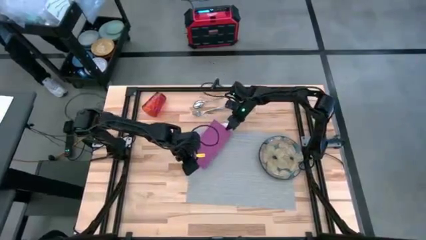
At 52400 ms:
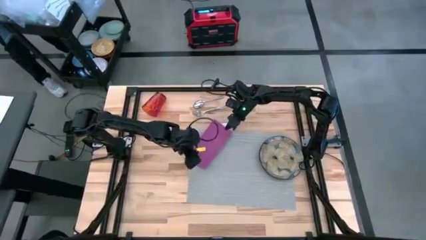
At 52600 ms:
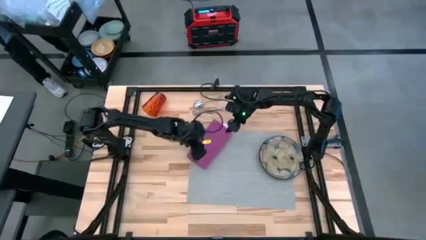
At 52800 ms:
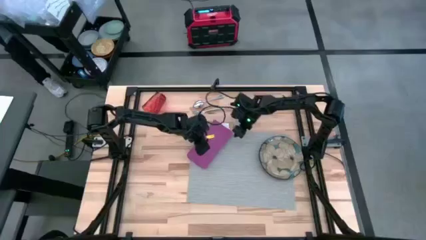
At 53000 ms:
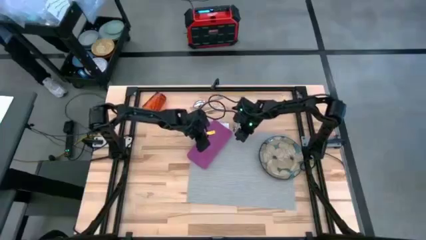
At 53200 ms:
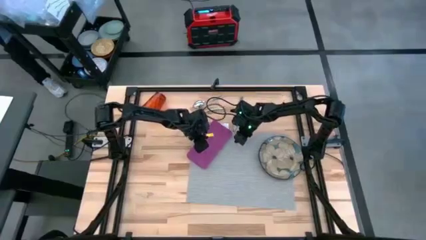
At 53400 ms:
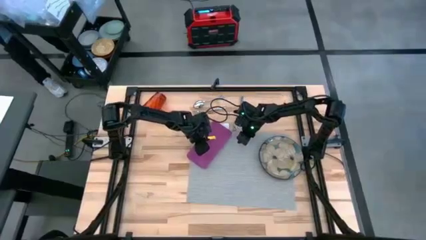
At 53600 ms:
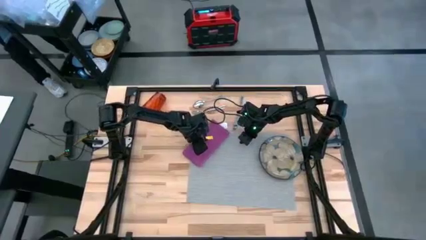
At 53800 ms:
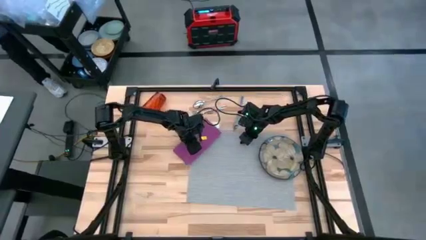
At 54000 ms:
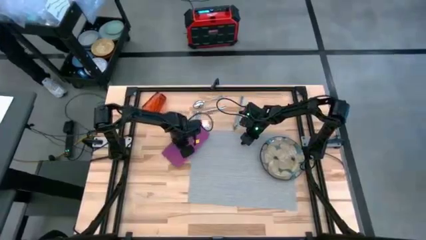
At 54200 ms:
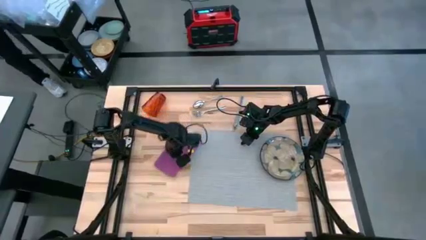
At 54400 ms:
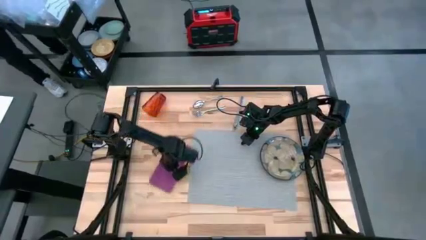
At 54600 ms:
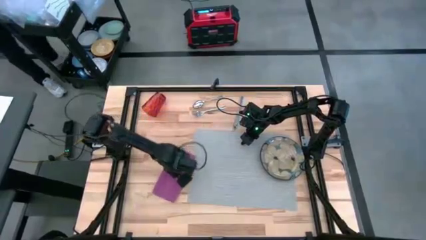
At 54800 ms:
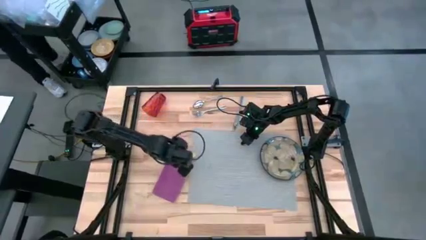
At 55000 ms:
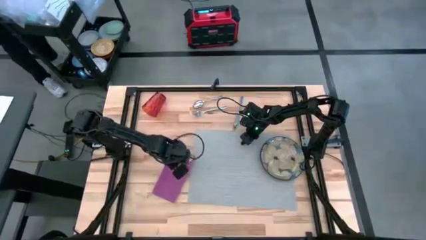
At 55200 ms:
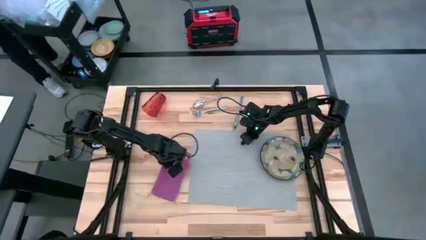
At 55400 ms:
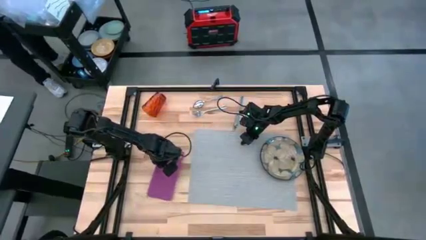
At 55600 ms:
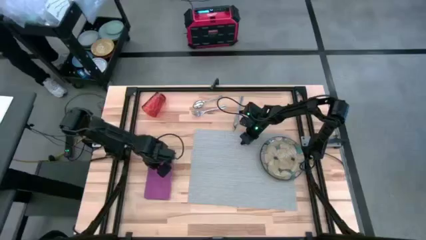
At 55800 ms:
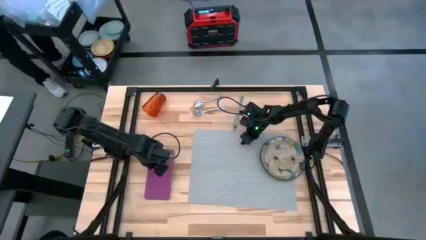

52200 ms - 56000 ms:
Task: Set table place
Move the folded violet table napkin to the left side of the gray table mat

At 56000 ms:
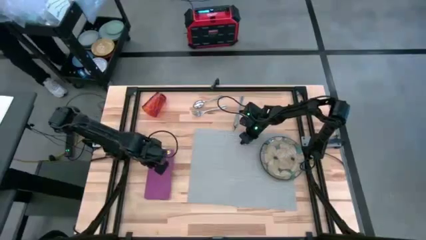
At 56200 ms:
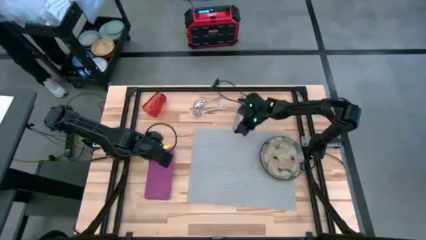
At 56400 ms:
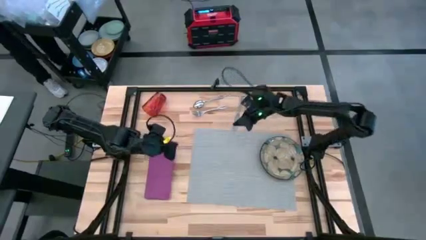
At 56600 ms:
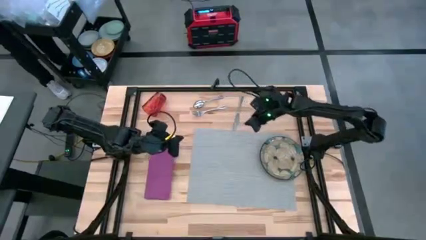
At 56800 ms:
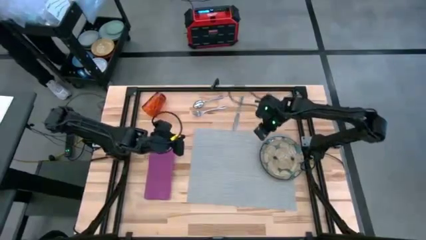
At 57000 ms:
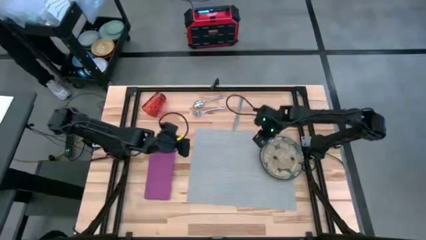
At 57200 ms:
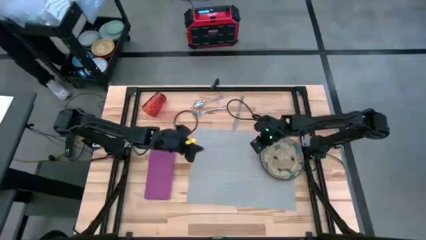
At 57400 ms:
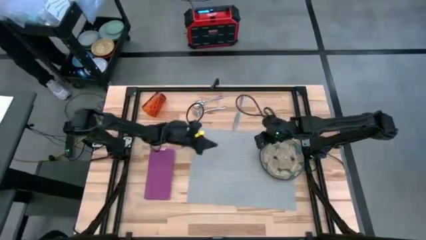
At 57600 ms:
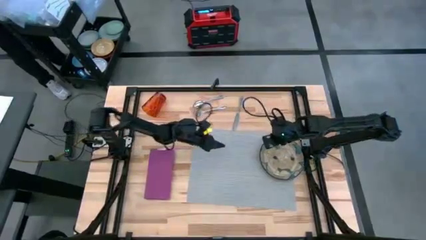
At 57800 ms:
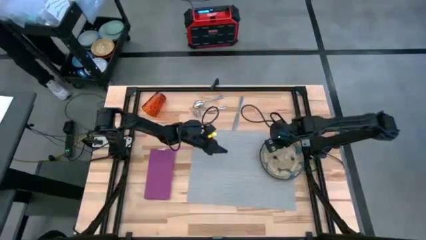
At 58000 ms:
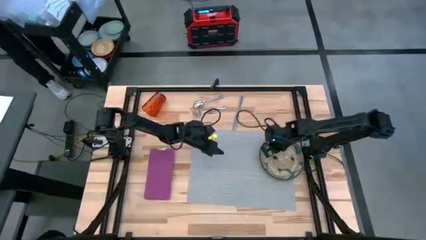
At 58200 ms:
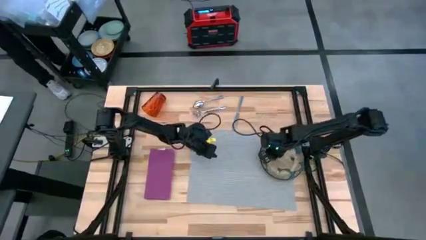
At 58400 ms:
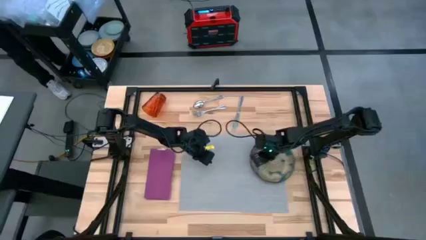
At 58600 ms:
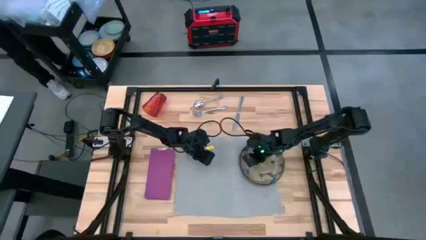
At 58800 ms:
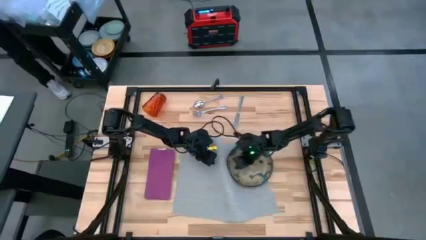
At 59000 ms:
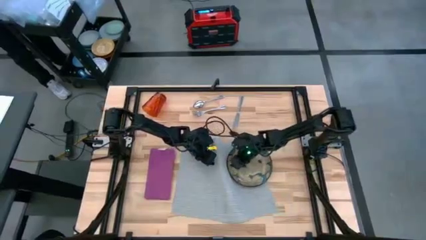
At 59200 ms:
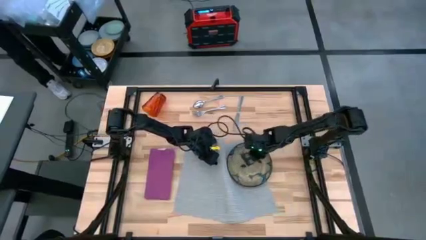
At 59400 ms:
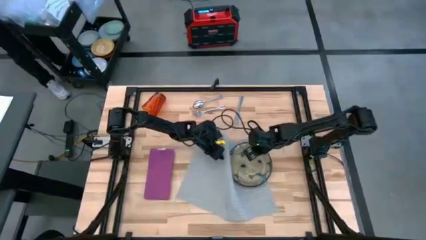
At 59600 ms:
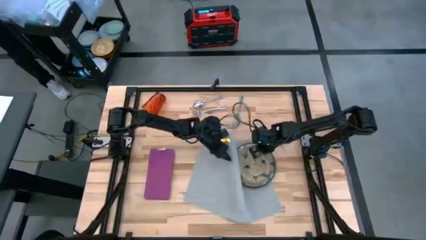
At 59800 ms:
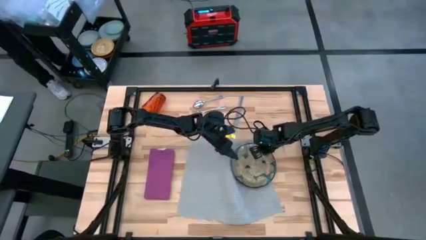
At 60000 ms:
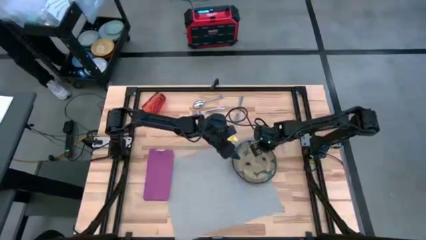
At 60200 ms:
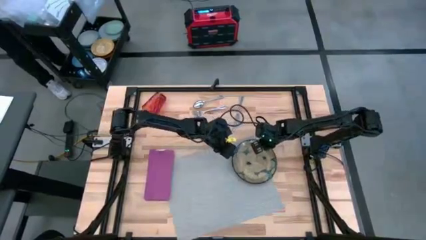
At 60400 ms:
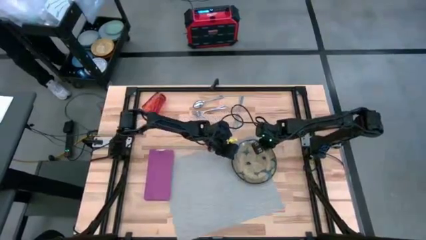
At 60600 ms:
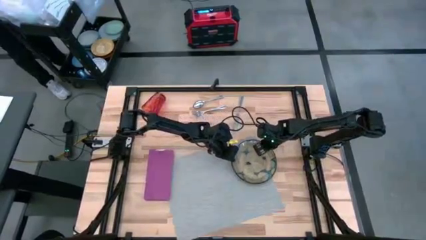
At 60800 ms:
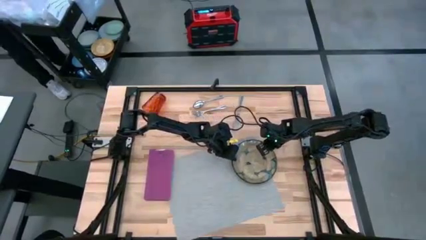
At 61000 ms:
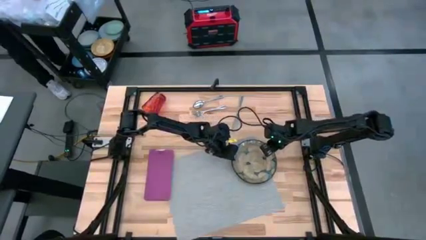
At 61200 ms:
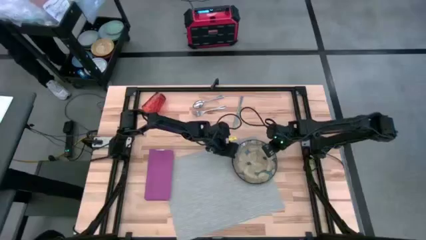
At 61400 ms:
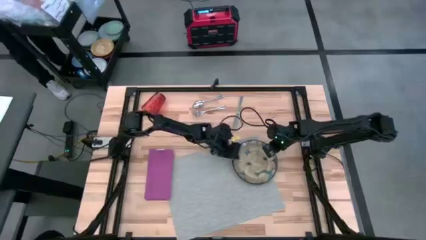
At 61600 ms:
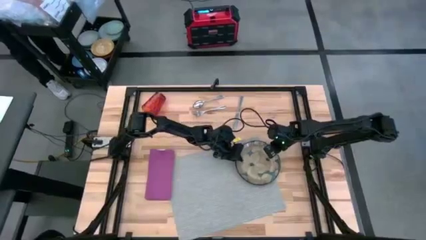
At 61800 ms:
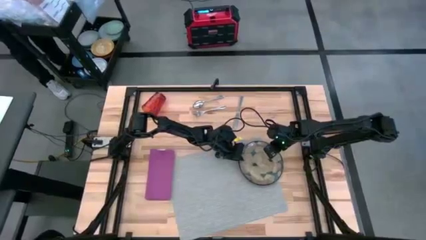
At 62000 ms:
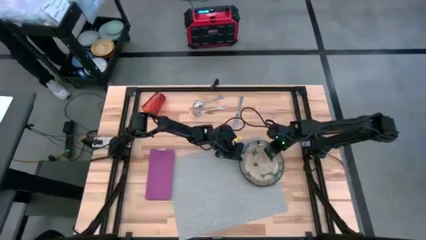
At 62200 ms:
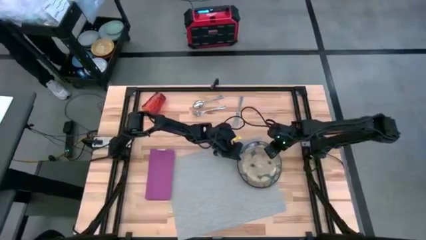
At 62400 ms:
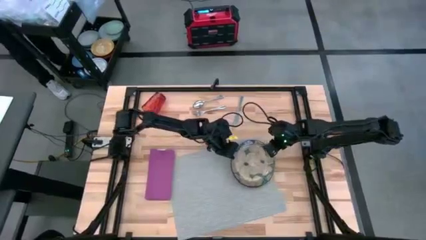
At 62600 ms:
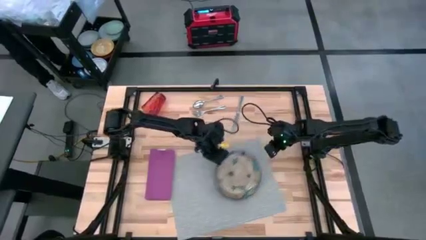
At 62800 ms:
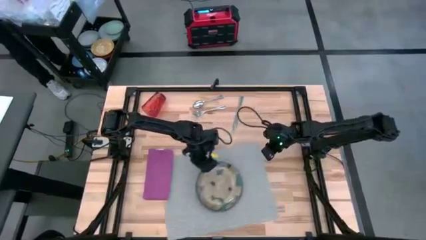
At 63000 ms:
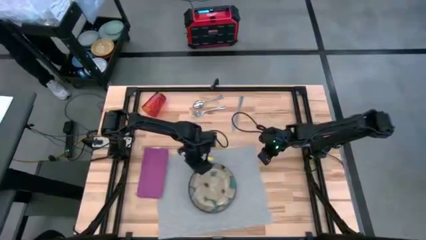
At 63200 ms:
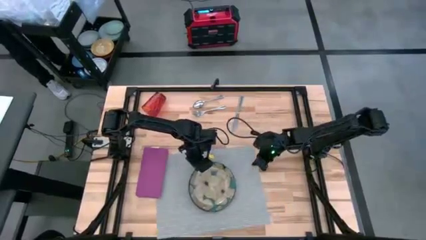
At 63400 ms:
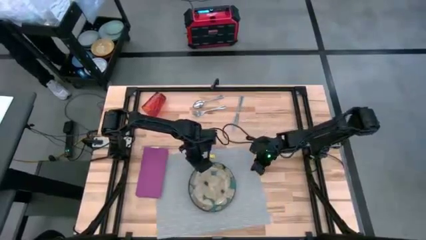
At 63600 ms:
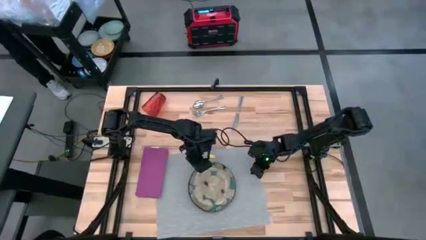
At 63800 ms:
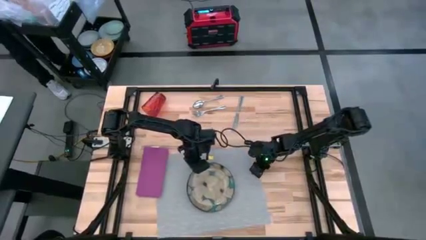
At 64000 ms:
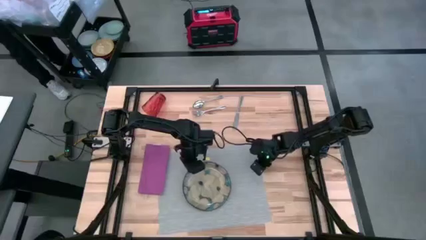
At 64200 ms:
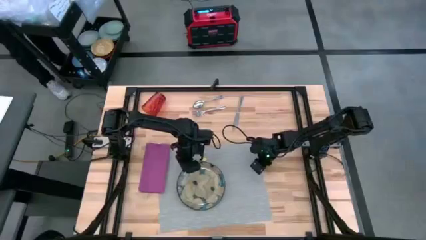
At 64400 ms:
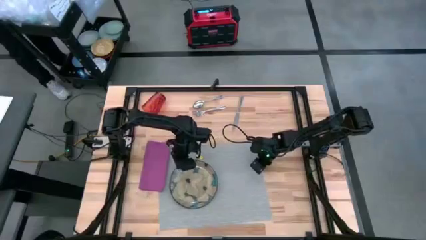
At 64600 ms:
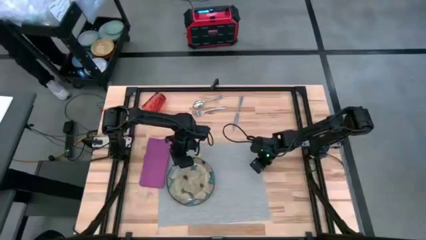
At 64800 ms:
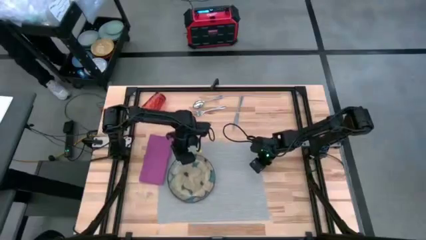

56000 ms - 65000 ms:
Put the patterned plate on the gray table mat

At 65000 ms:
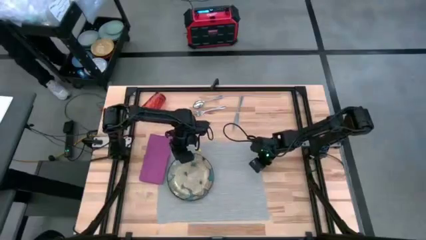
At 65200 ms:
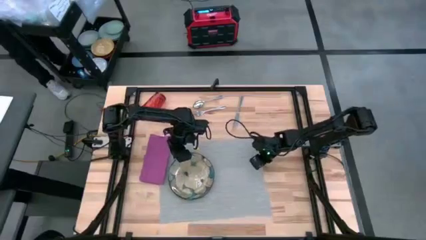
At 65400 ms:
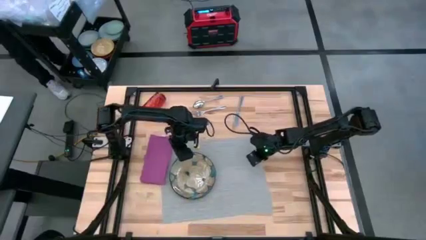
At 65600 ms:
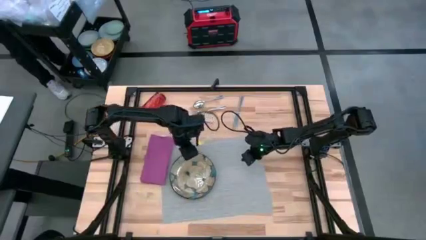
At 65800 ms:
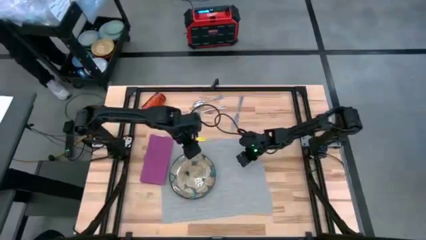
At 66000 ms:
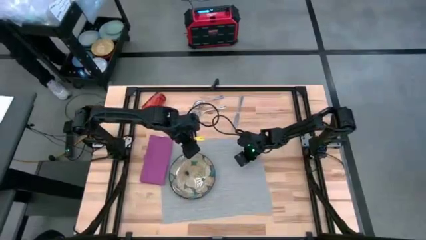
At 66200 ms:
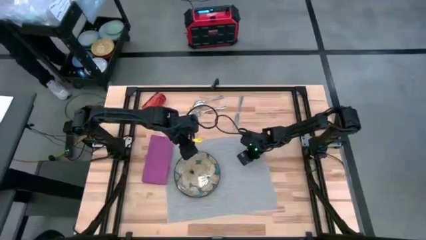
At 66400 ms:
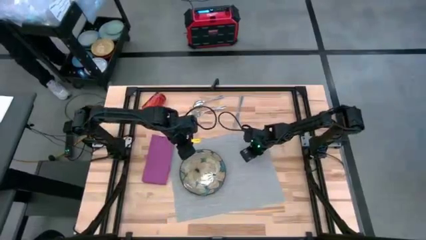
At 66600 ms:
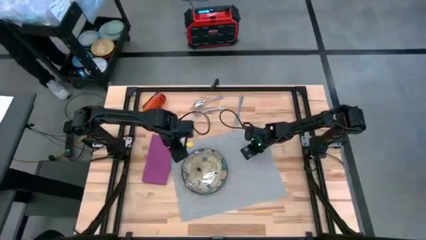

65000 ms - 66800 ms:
Adjust the gray table mat

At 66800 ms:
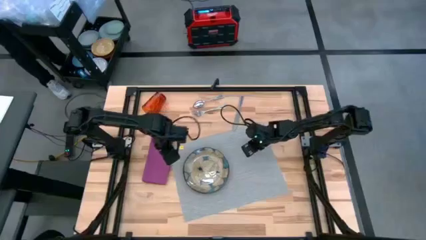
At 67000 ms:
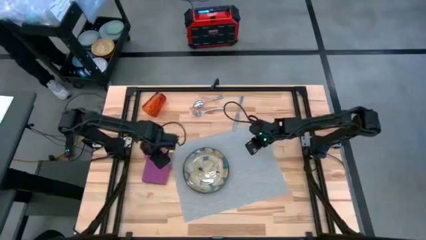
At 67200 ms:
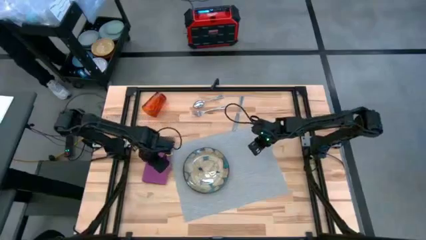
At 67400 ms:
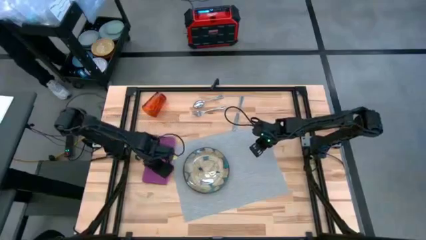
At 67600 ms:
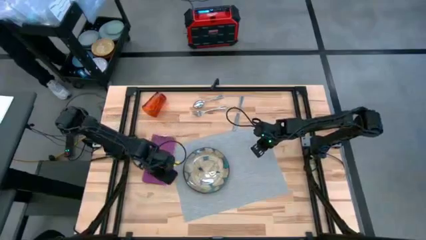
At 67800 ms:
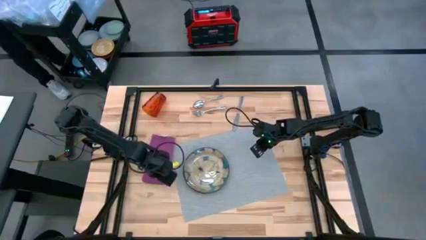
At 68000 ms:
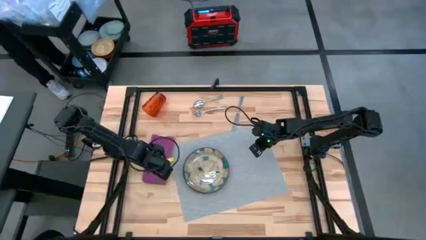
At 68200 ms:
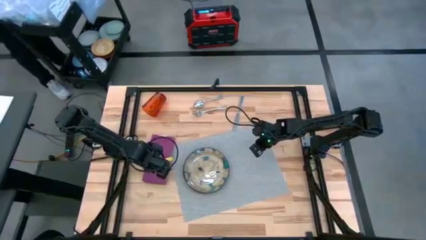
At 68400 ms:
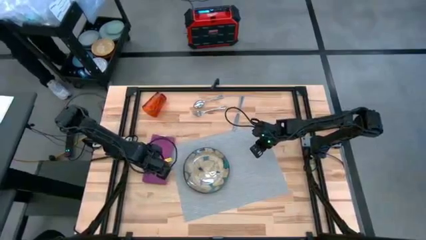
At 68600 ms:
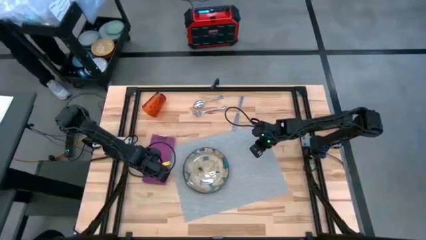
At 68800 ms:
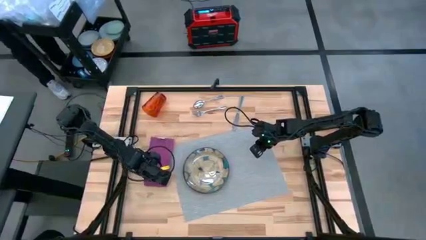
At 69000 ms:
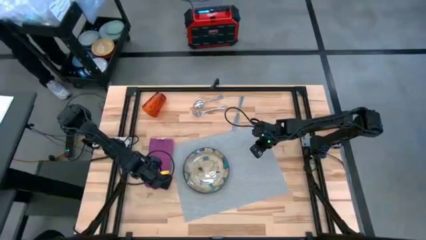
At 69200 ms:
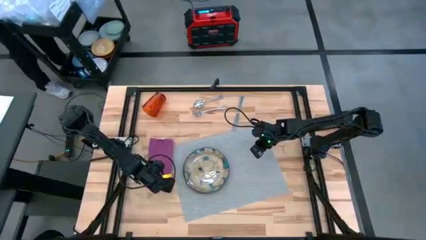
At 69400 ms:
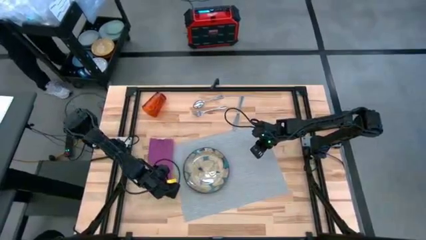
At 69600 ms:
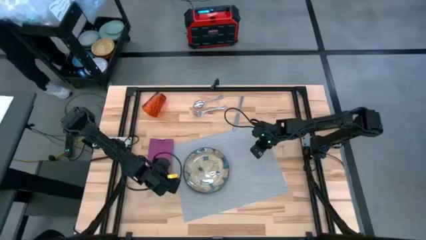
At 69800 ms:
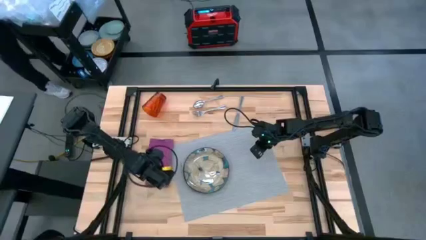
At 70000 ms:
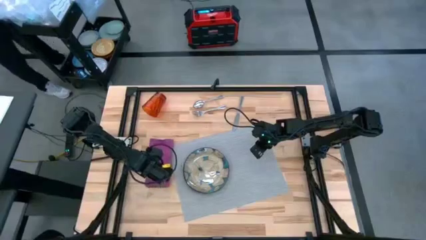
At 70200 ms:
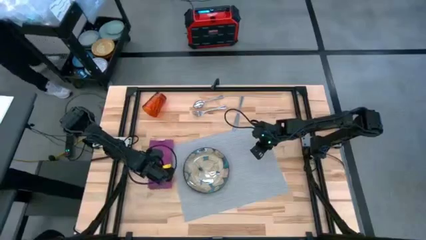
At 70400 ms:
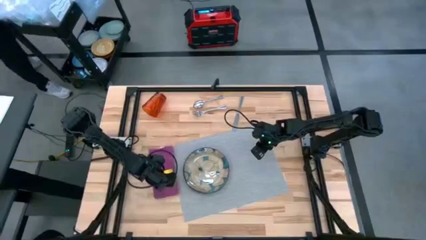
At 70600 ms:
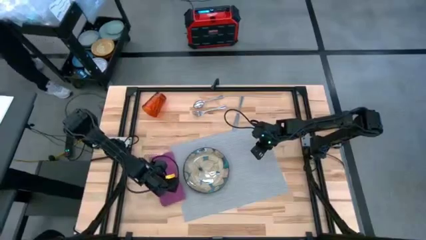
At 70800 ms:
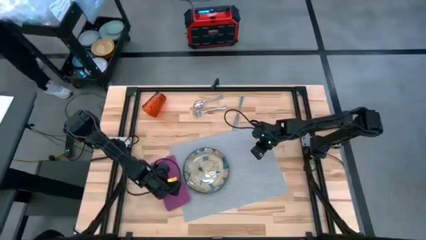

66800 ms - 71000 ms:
Adjust the pink table napkin beside the gray table mat
